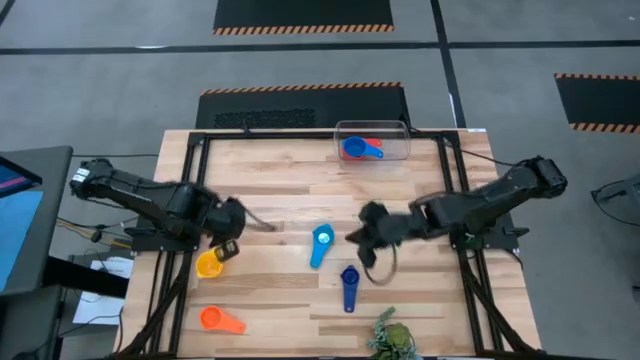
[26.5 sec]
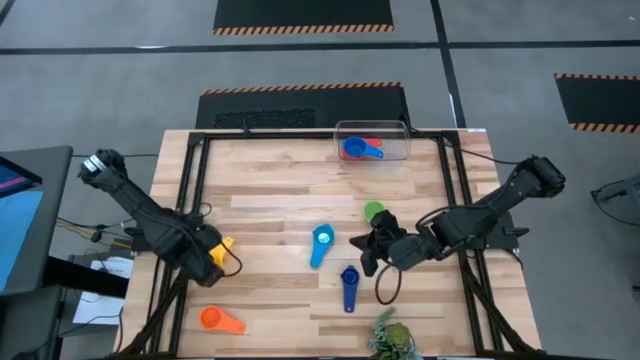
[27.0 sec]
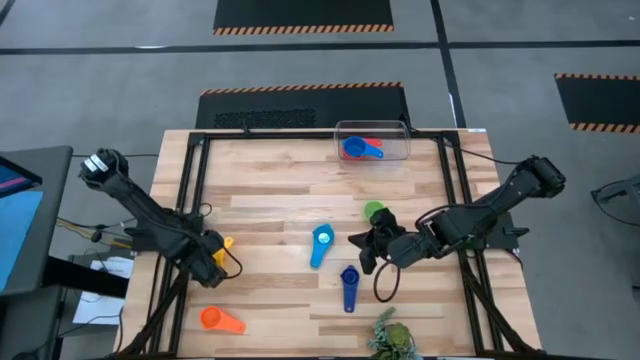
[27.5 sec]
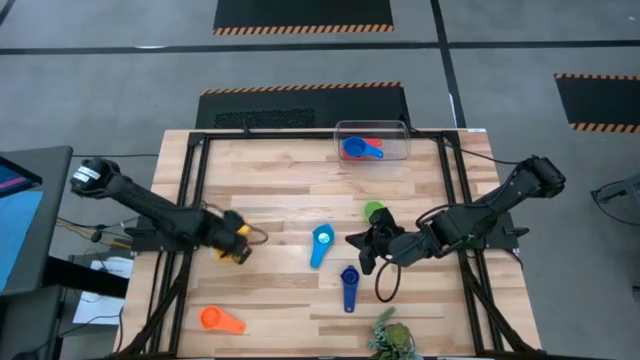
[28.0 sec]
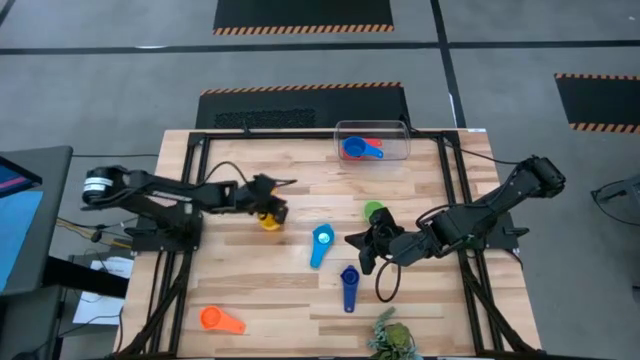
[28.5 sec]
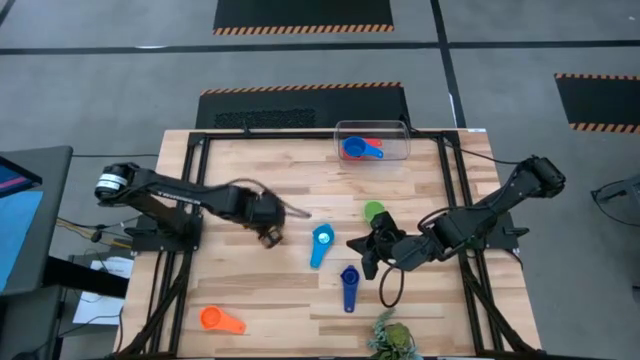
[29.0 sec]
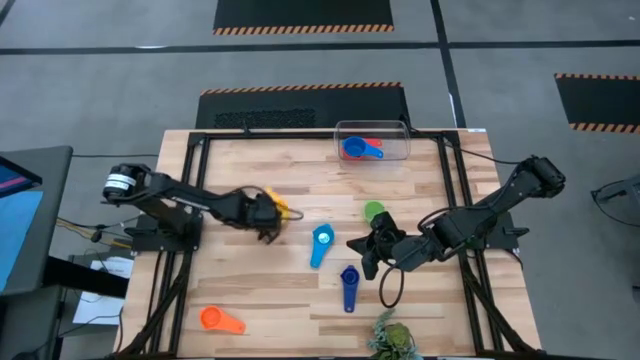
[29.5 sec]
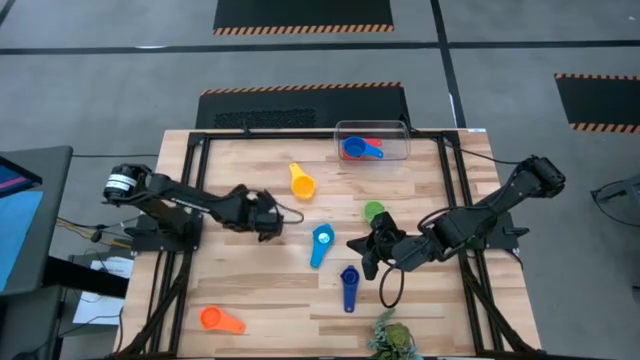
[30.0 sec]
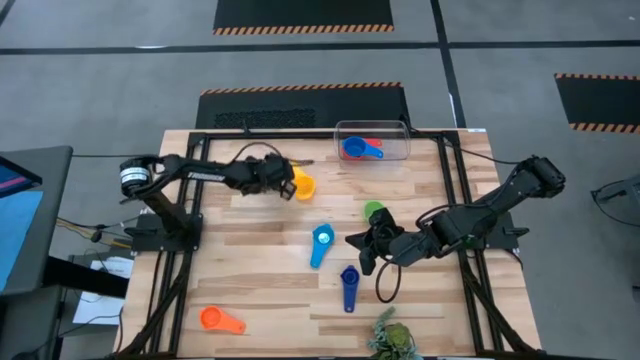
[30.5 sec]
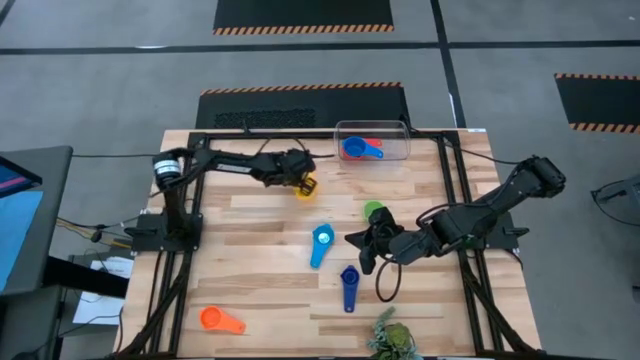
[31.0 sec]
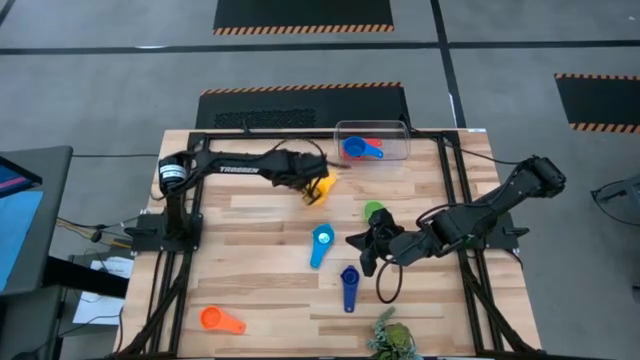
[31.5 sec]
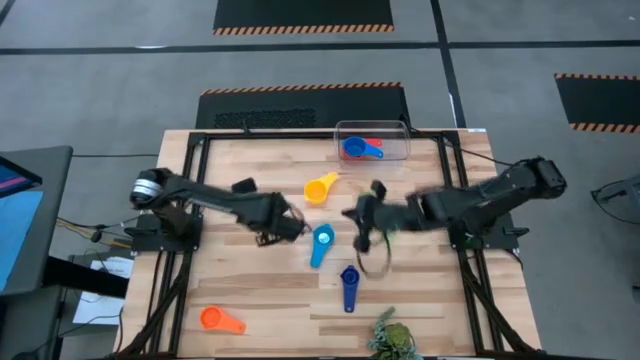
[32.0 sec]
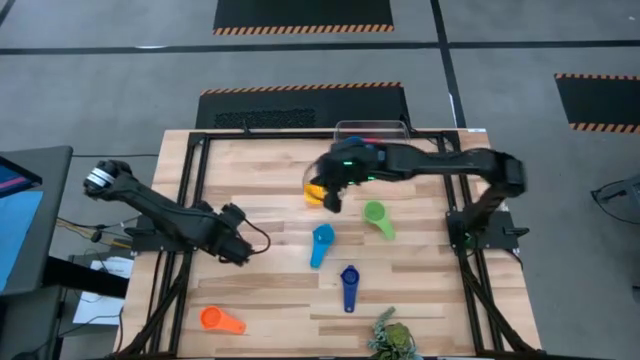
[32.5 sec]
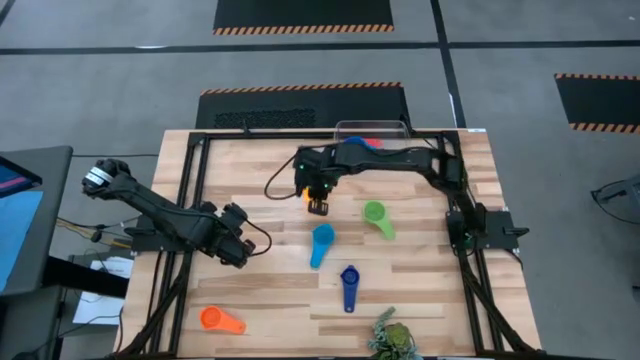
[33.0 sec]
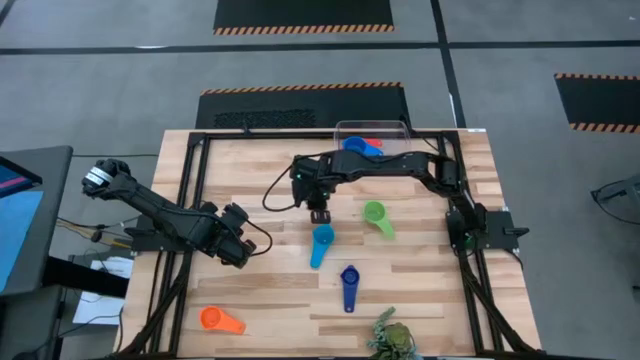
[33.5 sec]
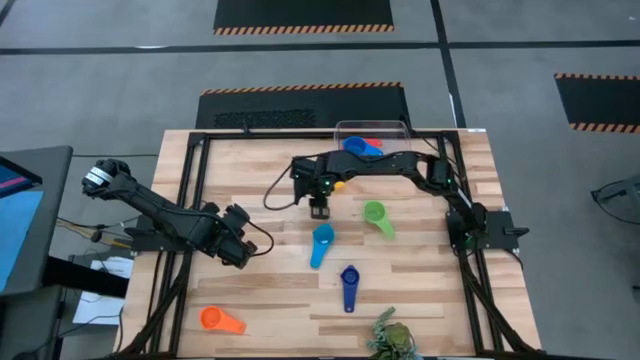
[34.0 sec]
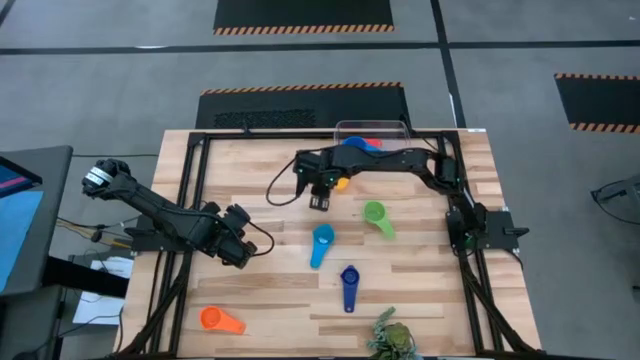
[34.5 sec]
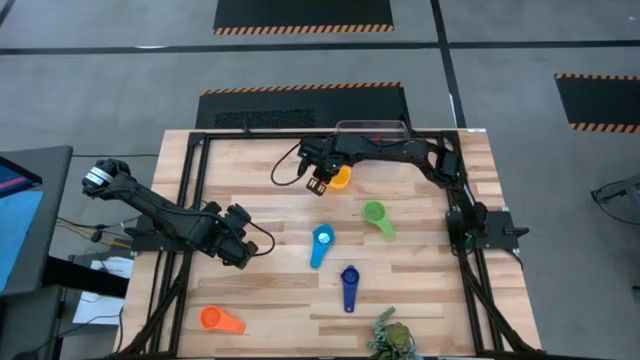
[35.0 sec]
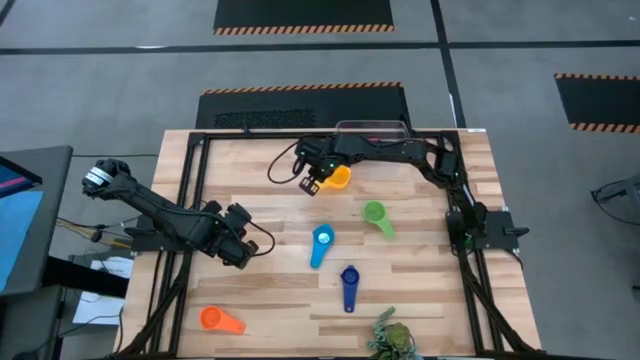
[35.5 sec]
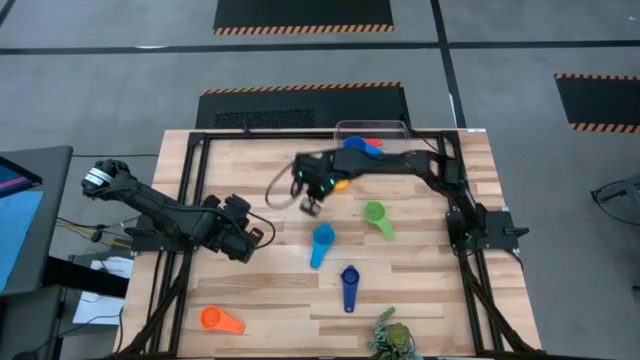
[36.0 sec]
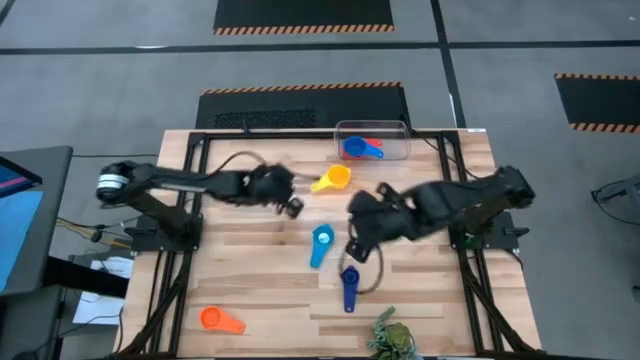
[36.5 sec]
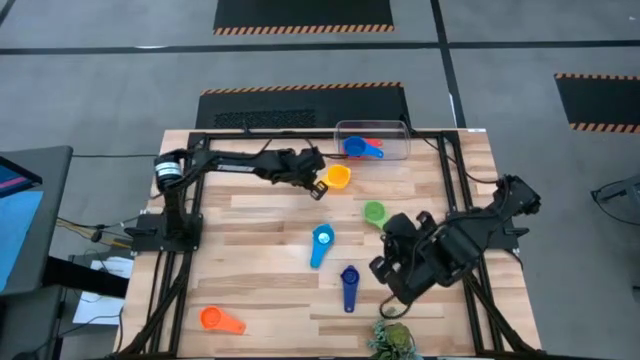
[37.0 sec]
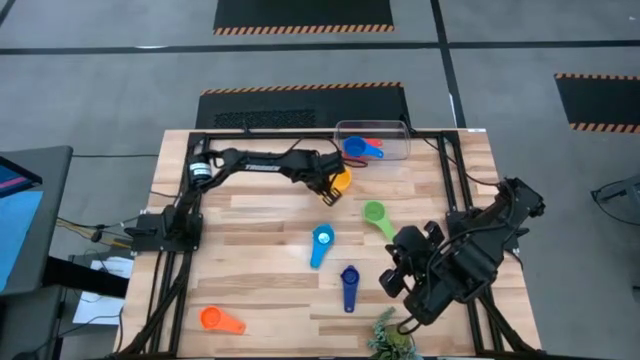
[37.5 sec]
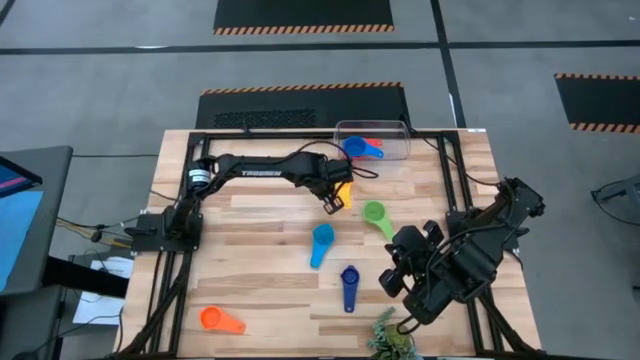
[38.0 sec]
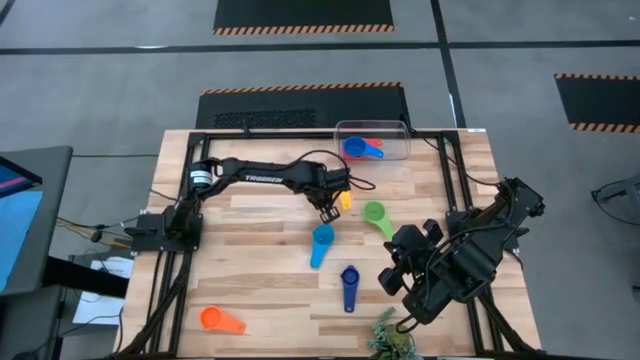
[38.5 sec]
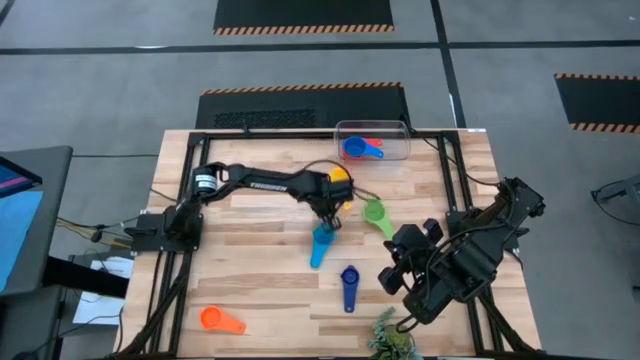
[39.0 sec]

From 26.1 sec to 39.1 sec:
Task: Nest measuring cups in basket
Stack the yellow measuring cup on top of the blue measuring cup in the transparent bin

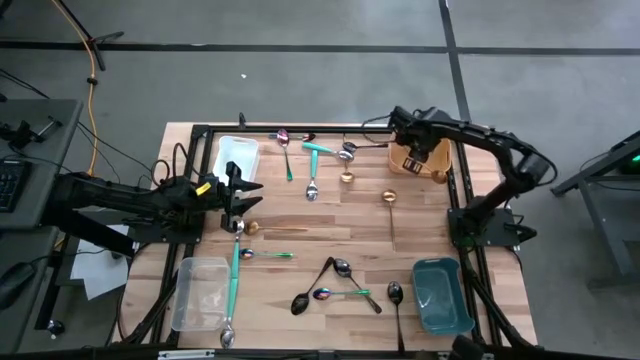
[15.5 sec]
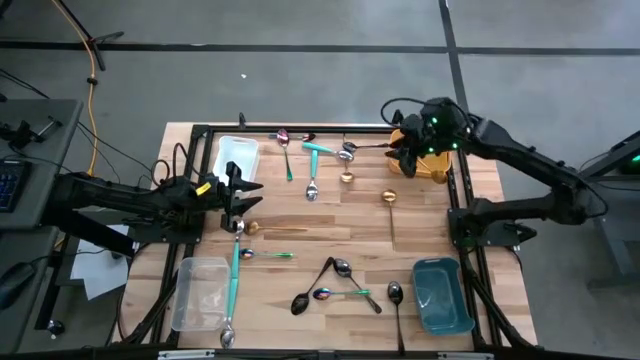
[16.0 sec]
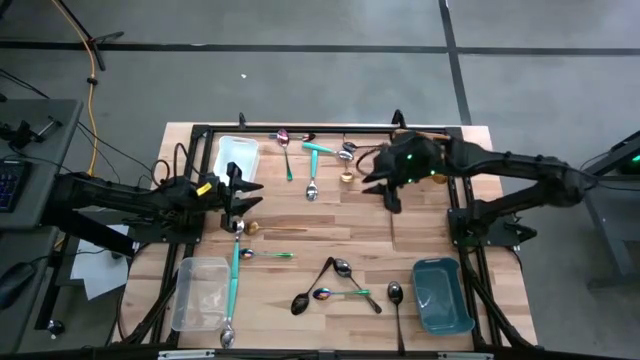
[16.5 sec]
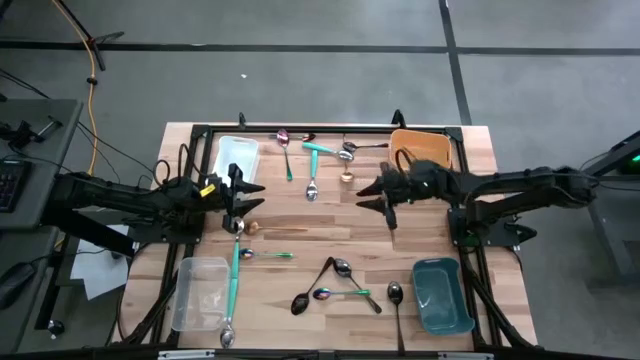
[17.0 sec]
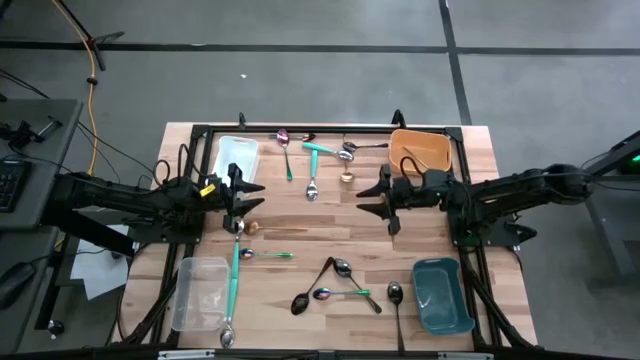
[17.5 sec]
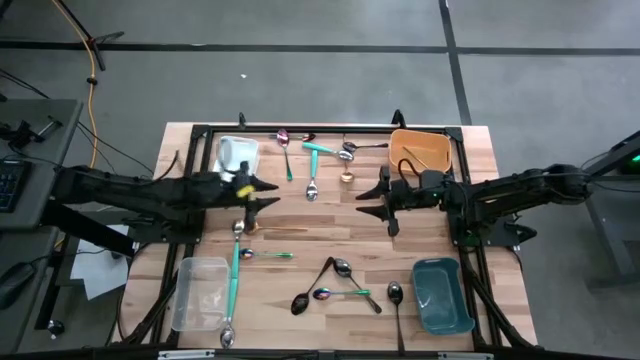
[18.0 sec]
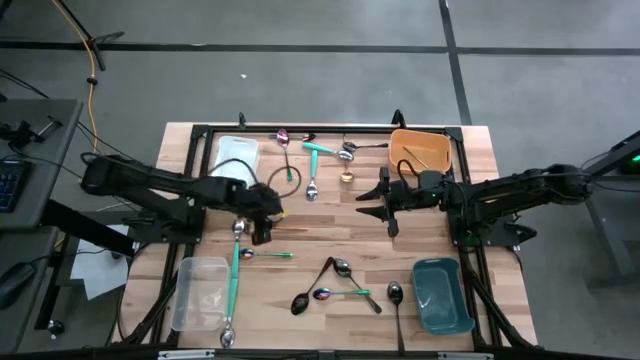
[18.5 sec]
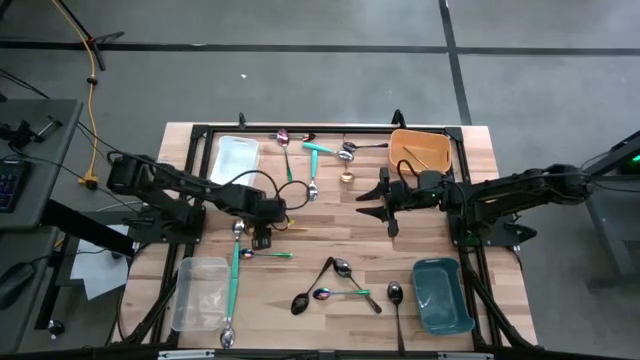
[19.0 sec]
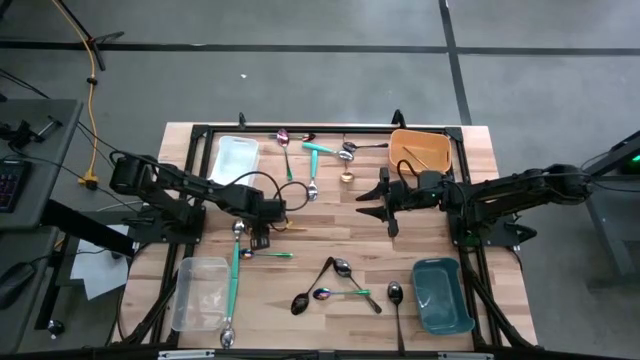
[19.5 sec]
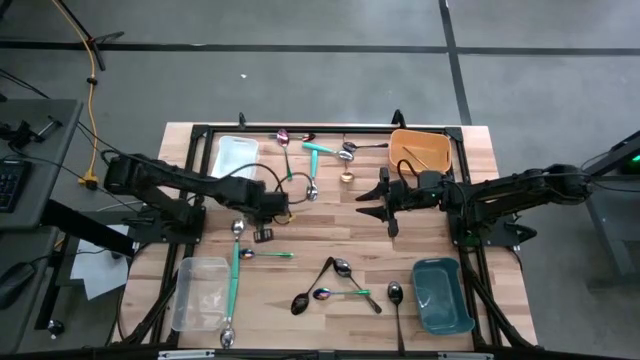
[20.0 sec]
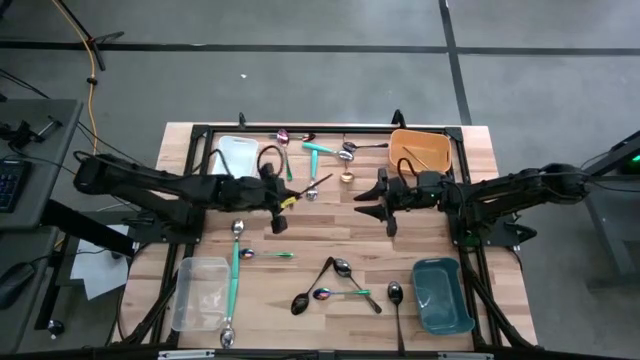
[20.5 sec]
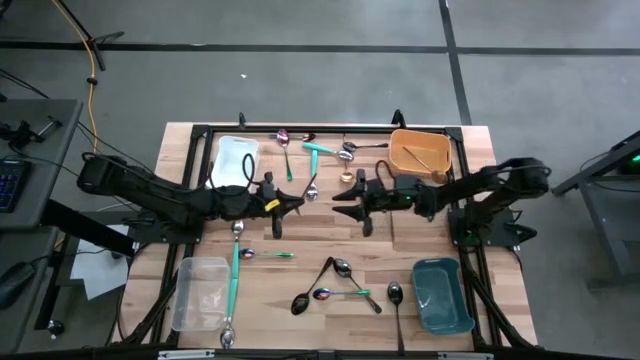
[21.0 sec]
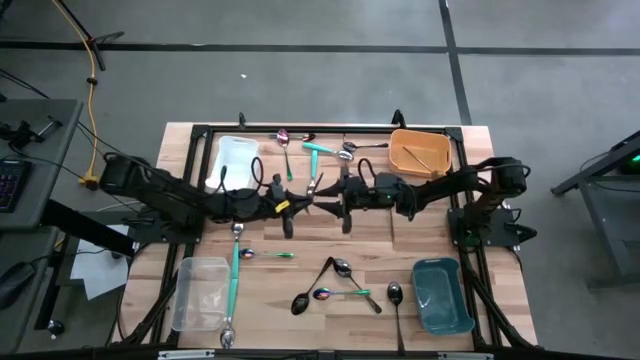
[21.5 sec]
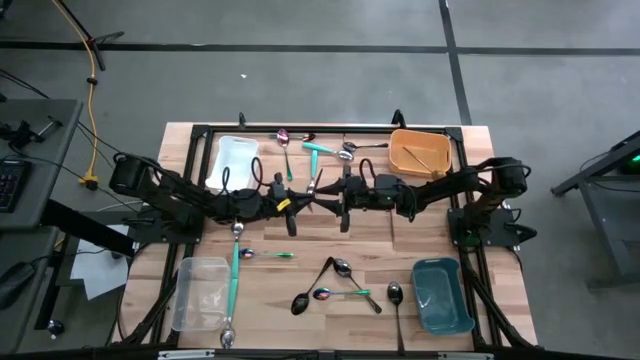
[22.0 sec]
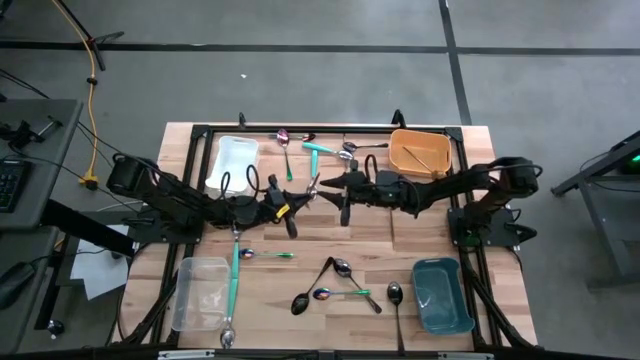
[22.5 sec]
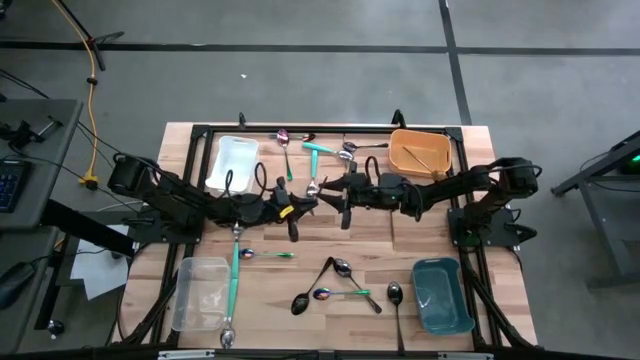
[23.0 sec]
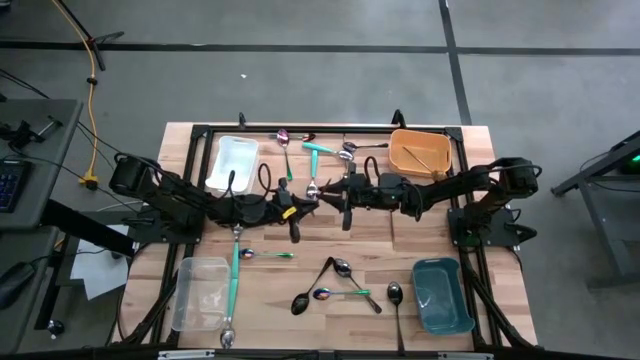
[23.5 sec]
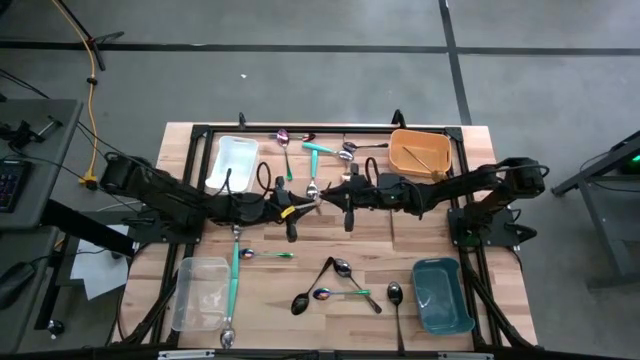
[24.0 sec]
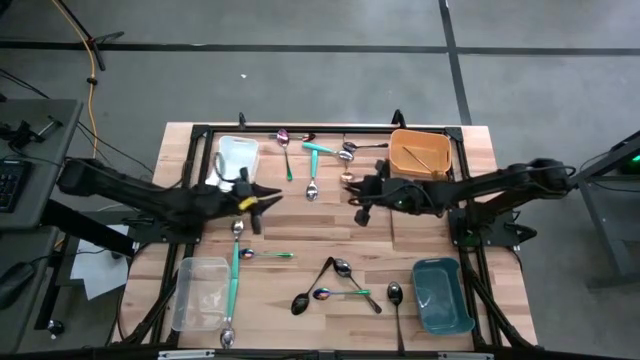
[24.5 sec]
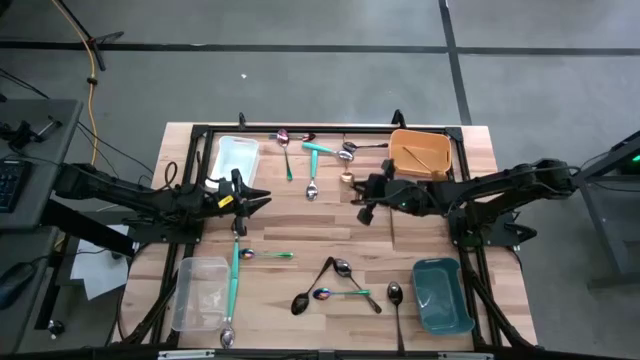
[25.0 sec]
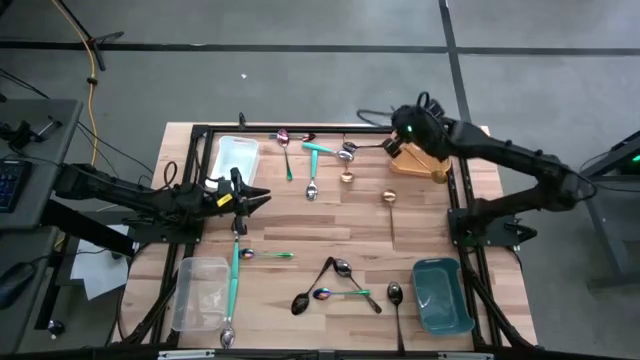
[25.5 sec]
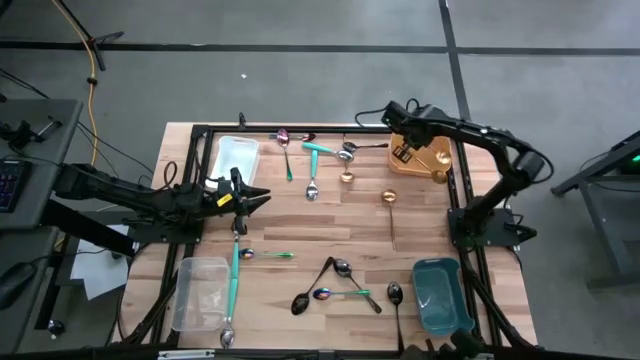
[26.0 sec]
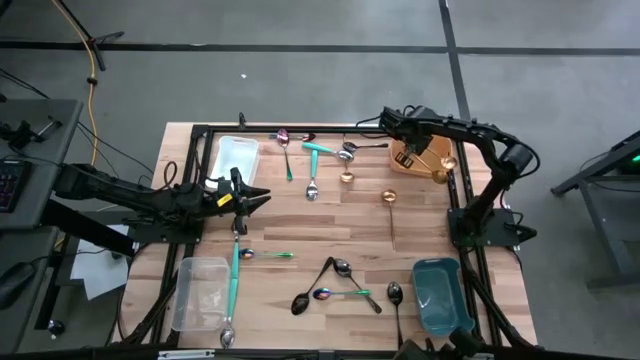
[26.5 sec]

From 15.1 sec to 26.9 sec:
Task: Sort silverware by color (type)
Put the gold spoon into the yellow bin
